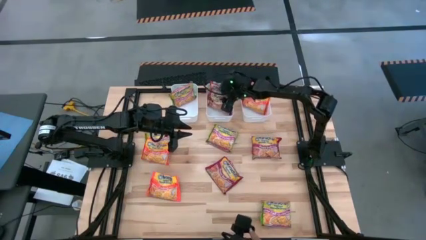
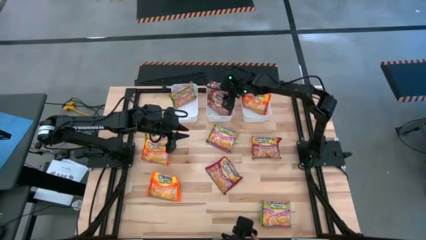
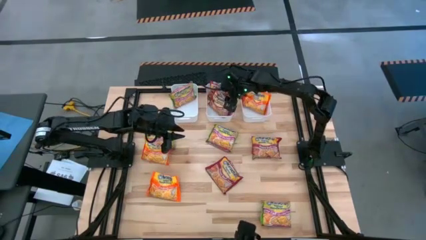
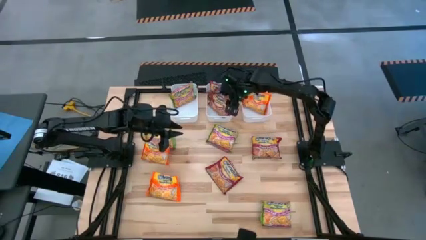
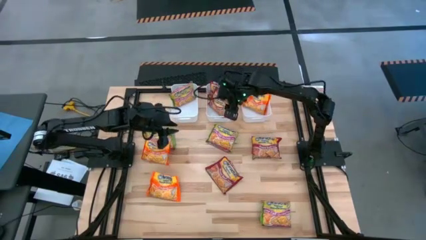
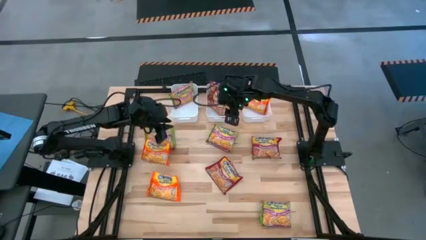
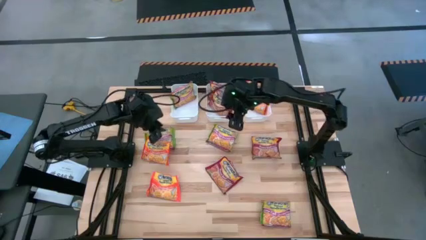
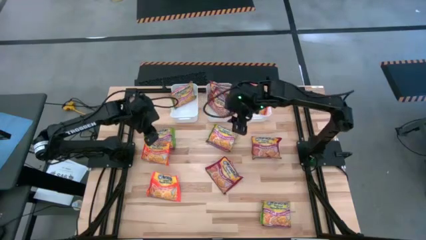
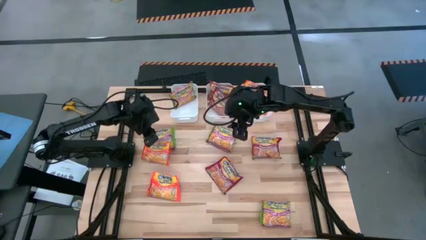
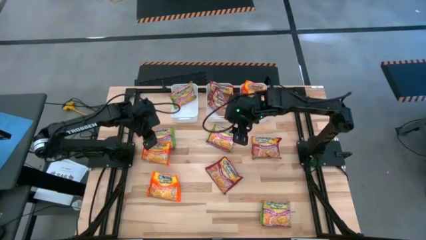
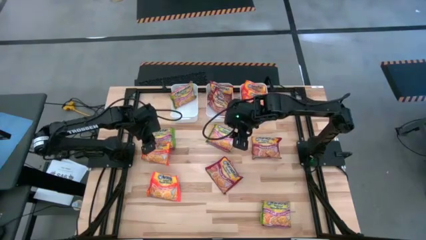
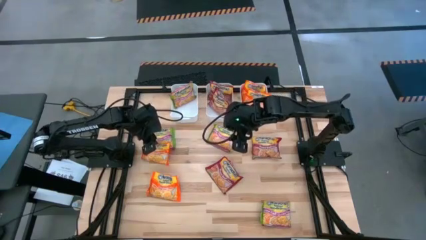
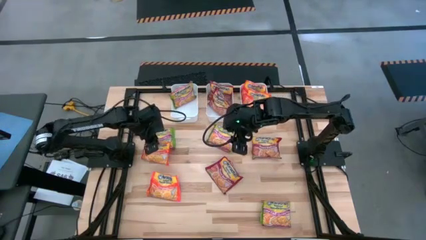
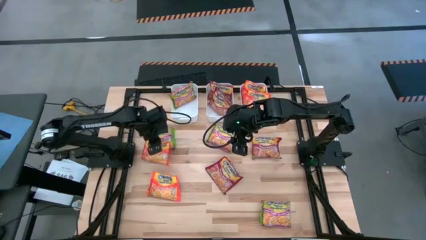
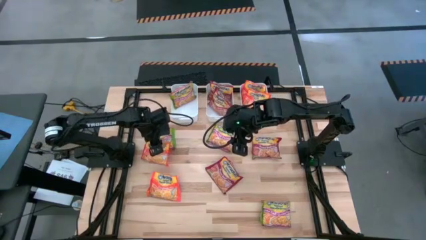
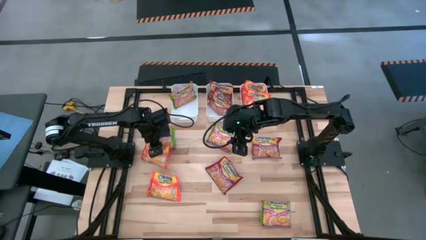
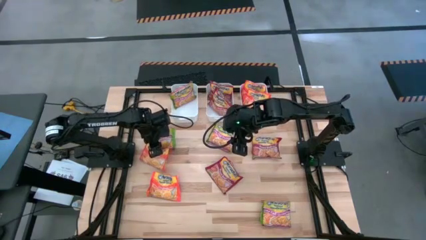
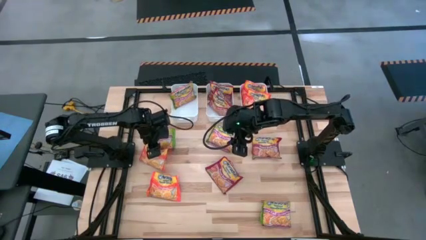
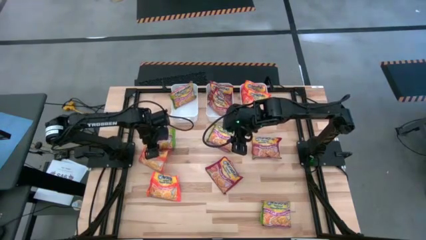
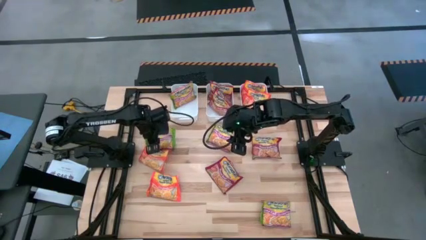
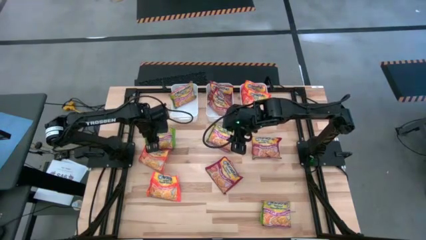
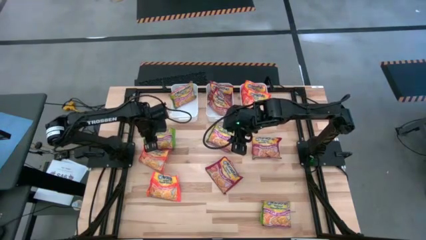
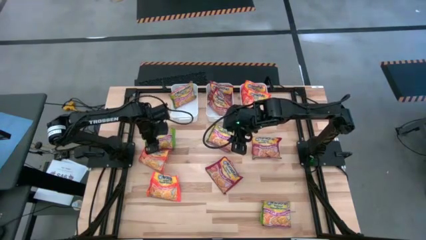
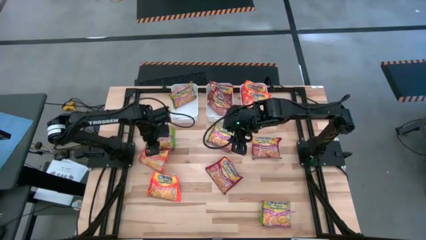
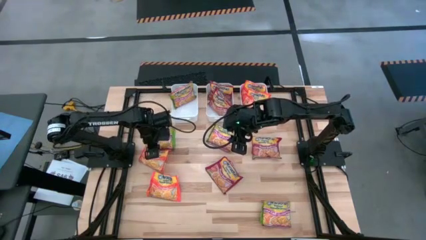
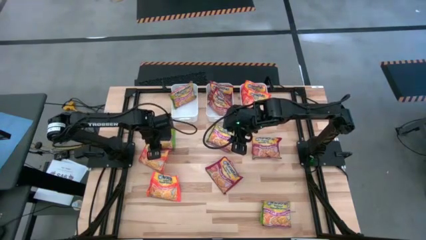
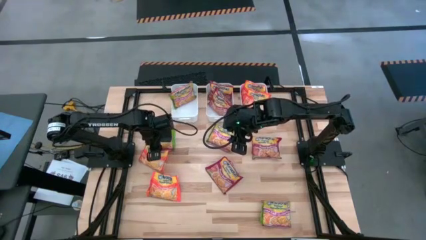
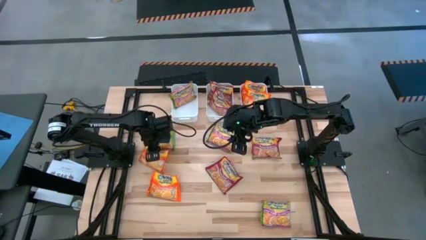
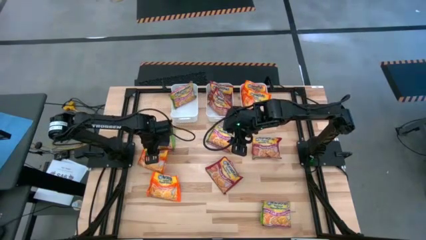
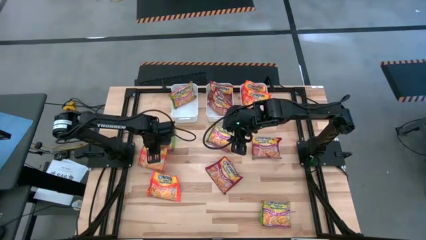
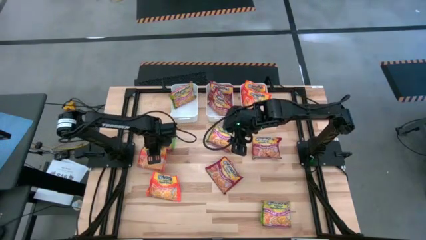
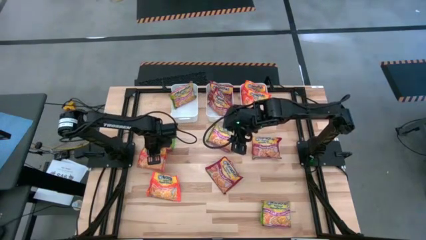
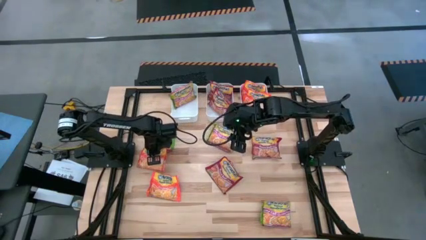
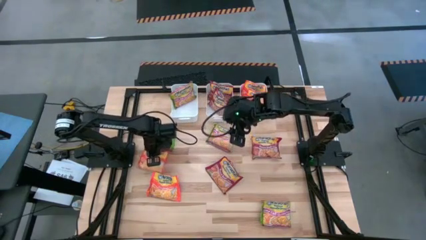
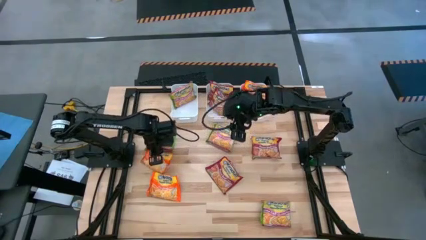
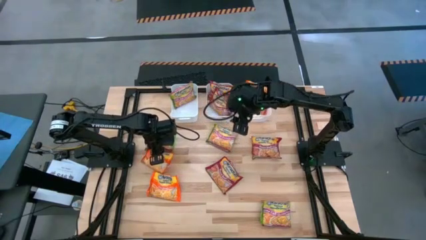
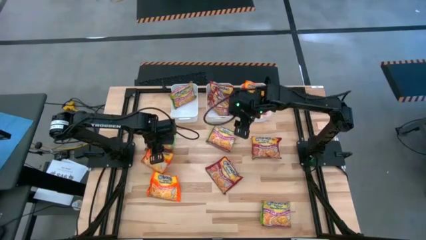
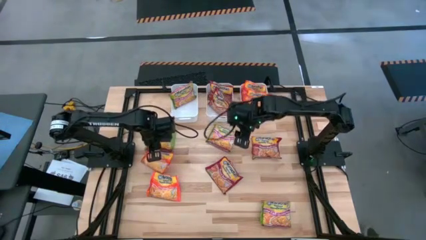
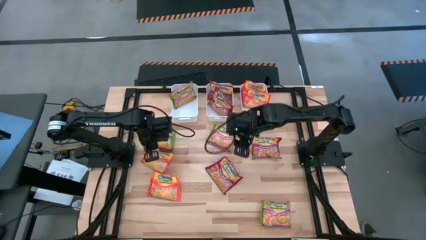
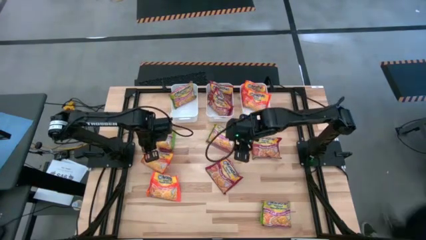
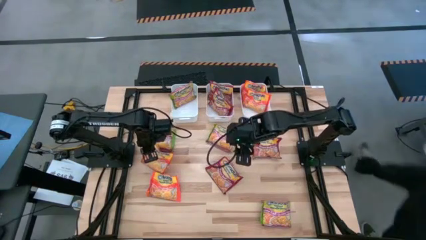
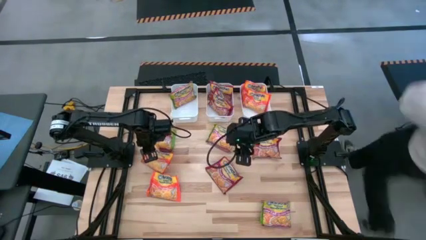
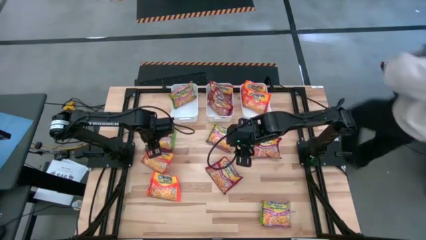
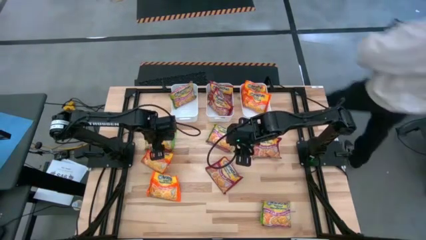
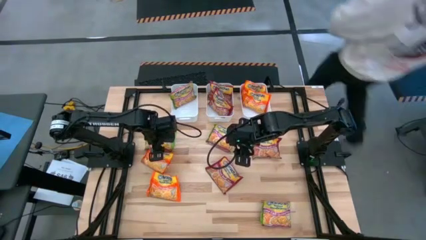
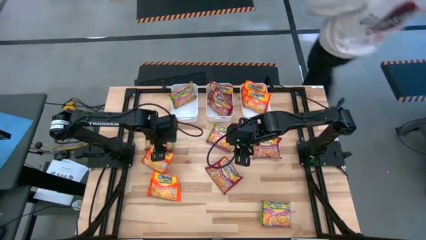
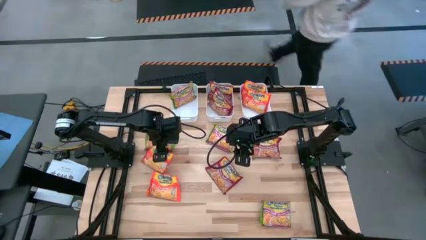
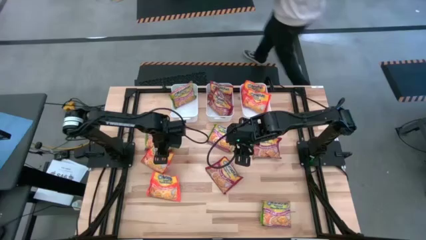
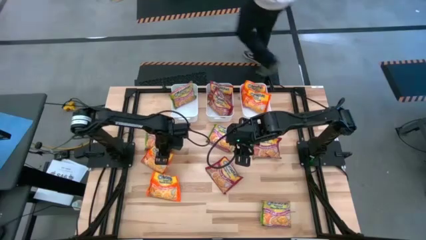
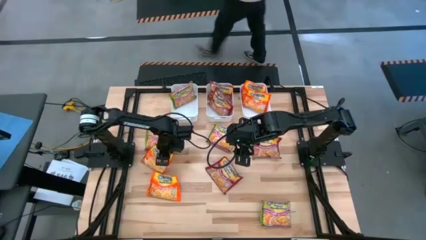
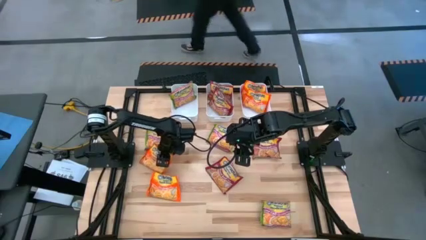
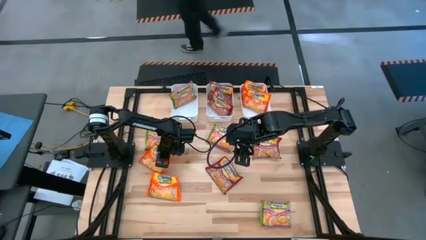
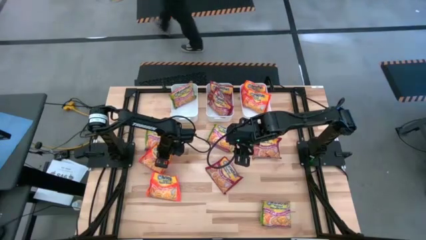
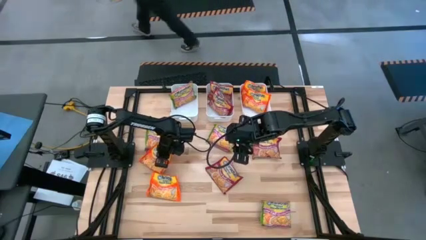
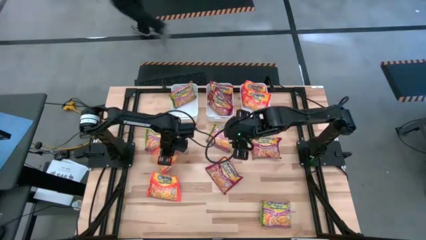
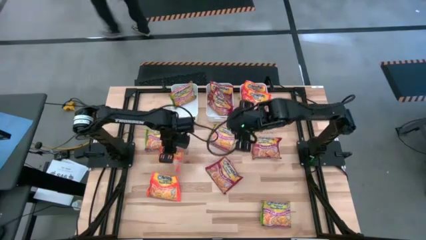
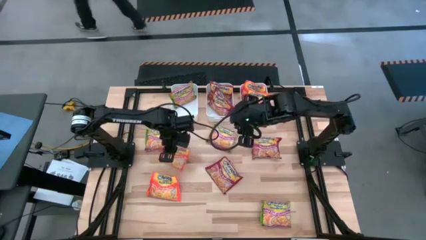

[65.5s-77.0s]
Task: Sort Maruchan noodles
Put the orange noodle pack into the right white bin

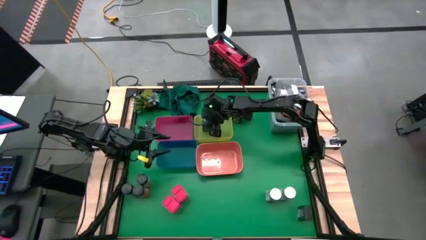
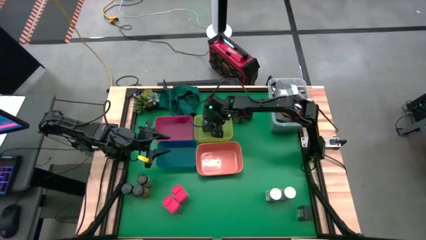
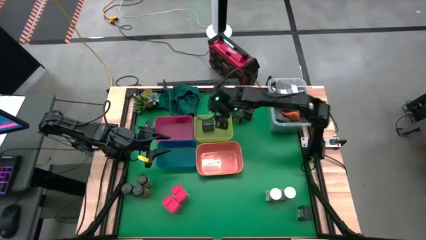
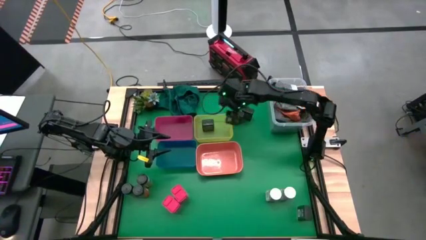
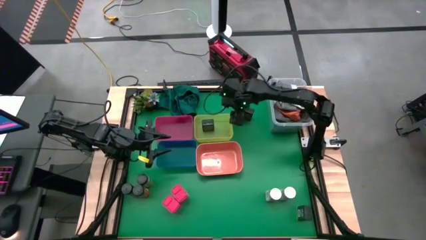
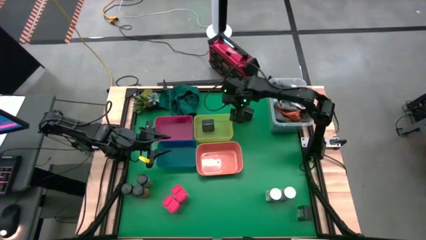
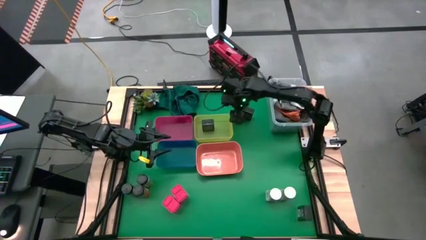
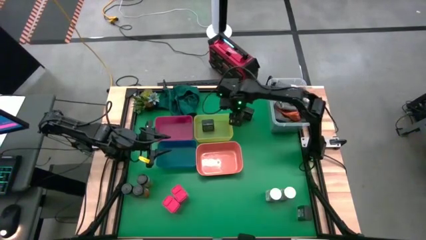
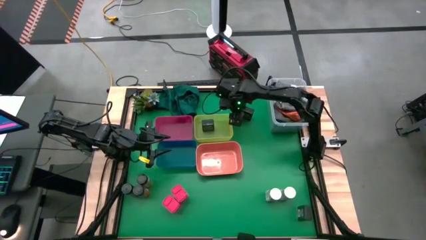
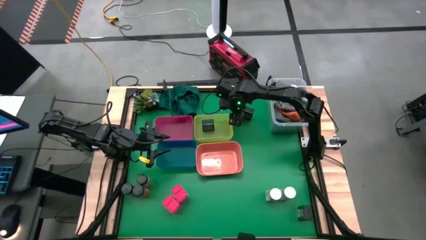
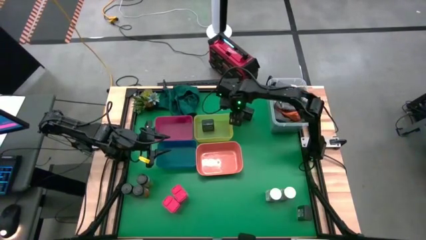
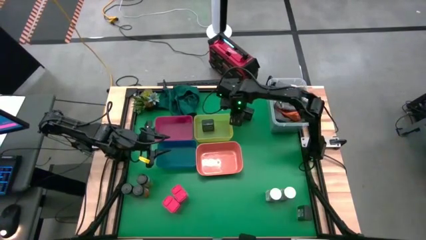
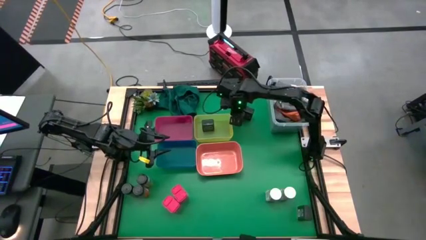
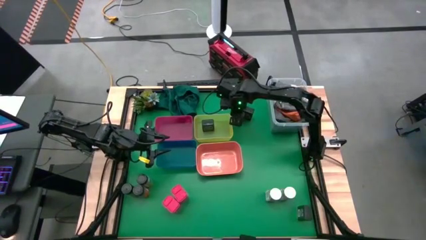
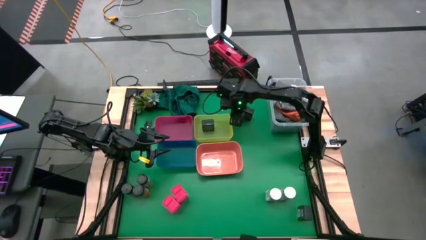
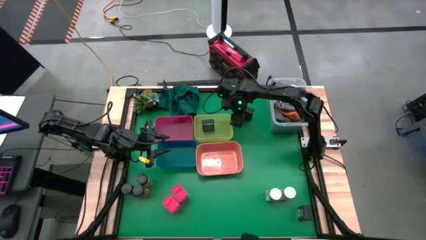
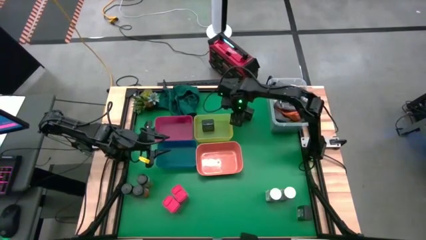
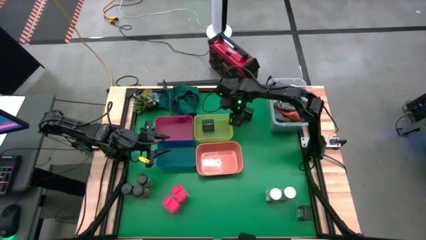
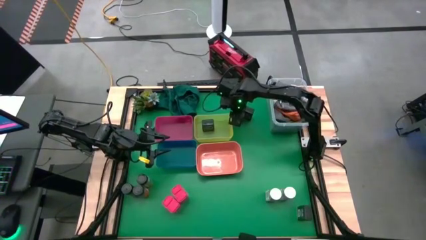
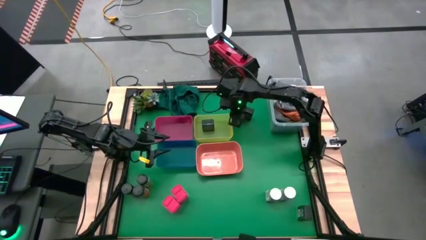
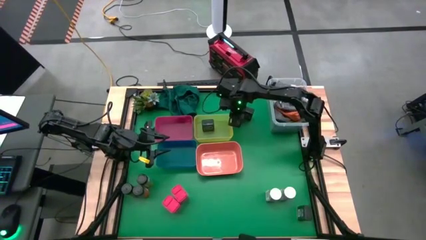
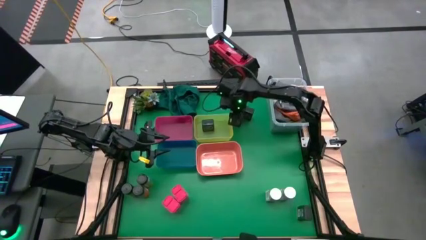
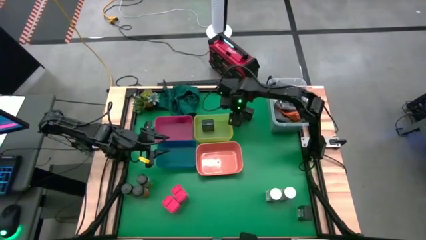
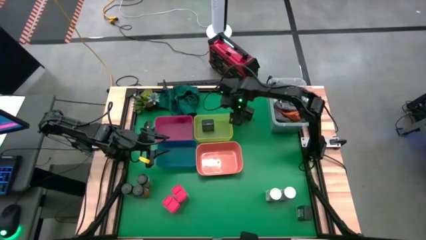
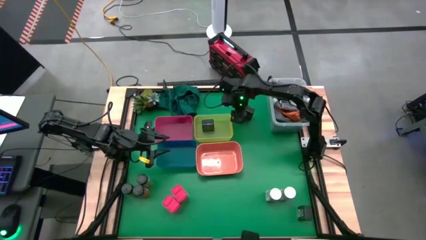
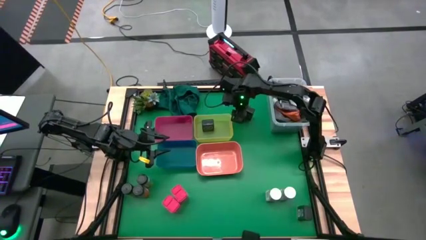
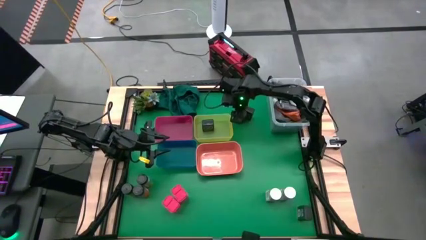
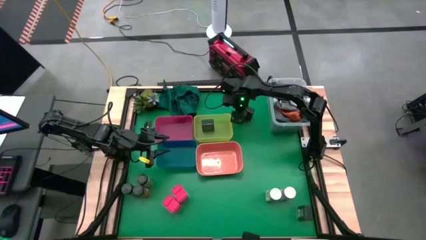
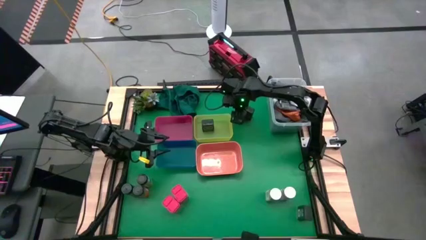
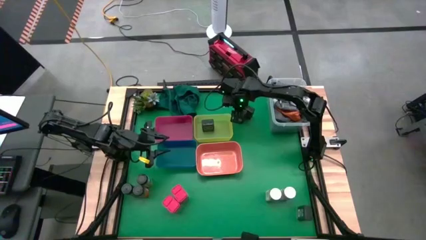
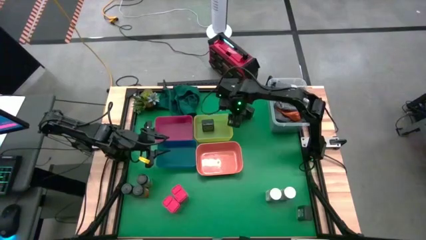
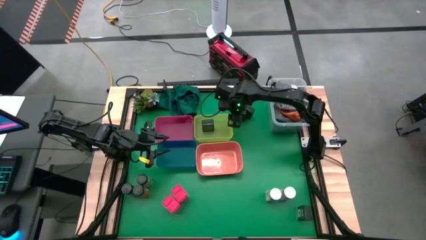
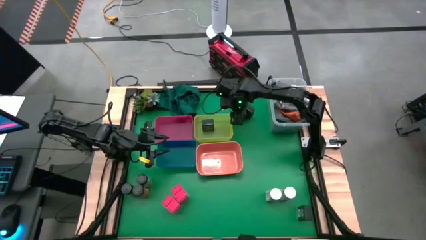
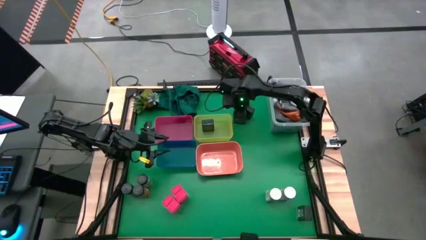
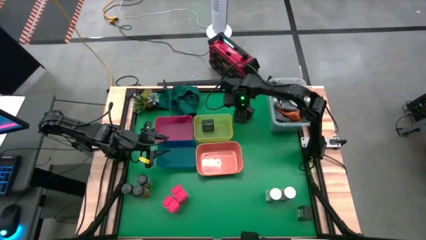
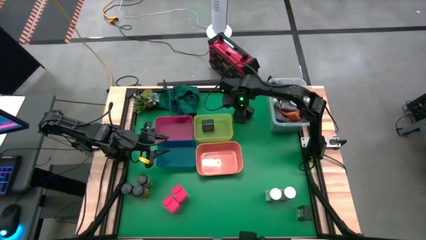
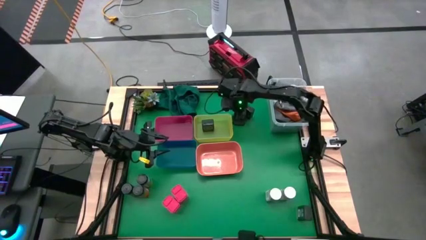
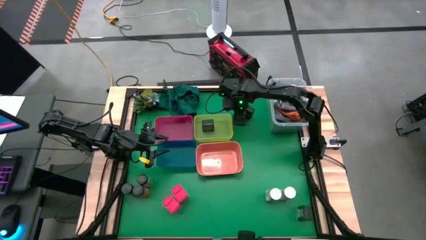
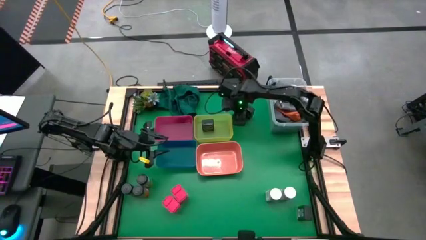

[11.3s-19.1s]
Task: Sort spices by type
Put the top left black seasoning can into the yellow bin
